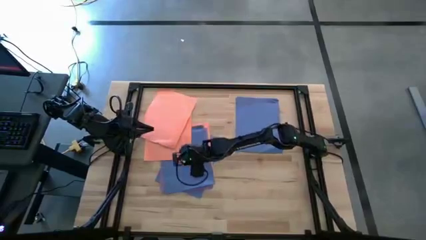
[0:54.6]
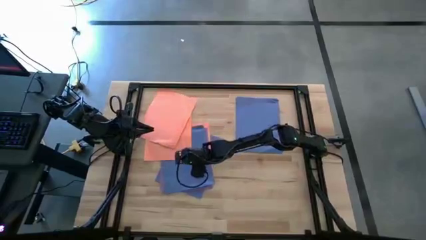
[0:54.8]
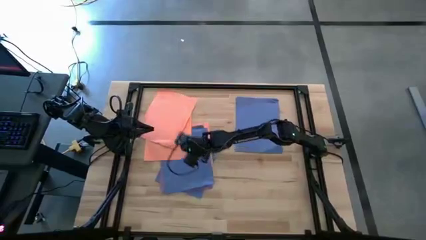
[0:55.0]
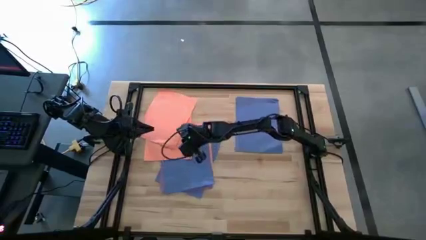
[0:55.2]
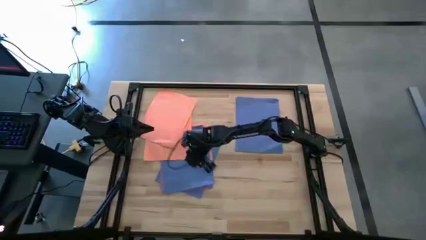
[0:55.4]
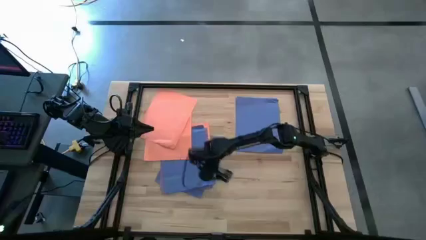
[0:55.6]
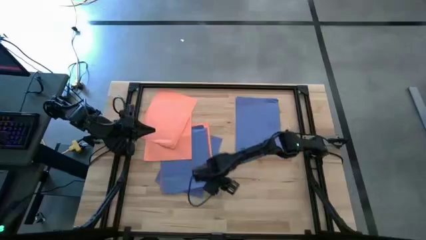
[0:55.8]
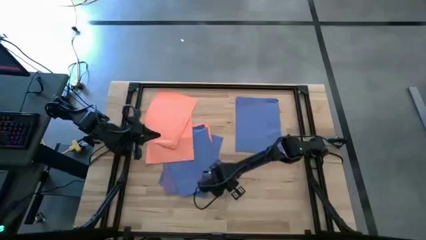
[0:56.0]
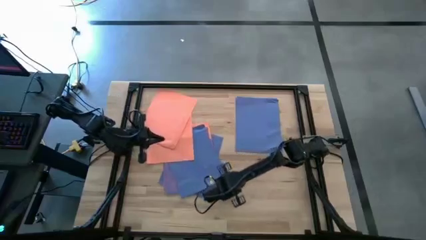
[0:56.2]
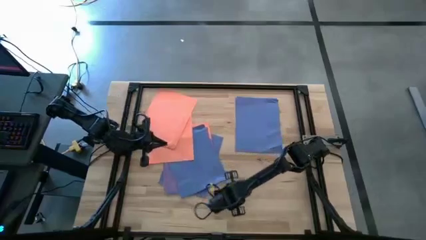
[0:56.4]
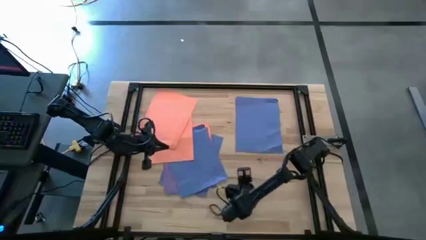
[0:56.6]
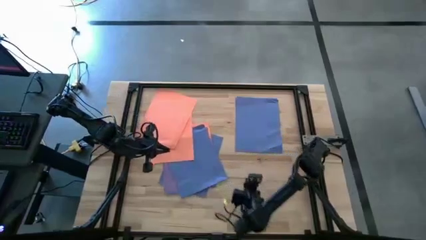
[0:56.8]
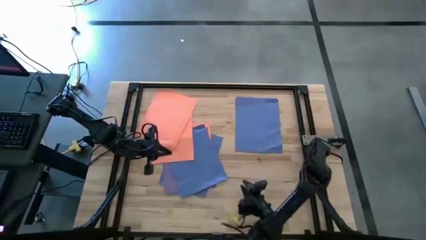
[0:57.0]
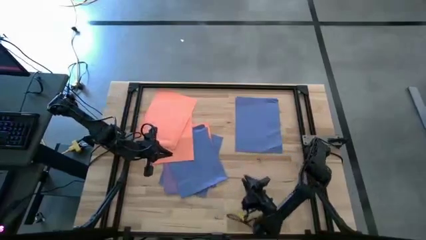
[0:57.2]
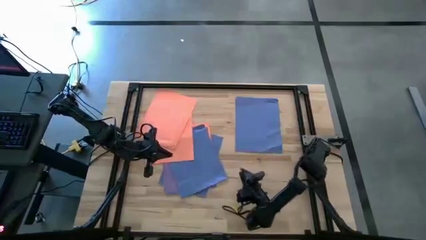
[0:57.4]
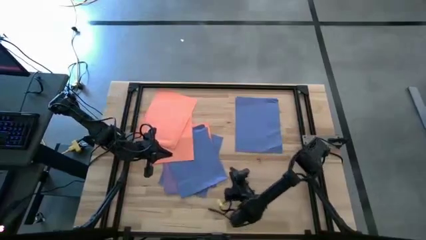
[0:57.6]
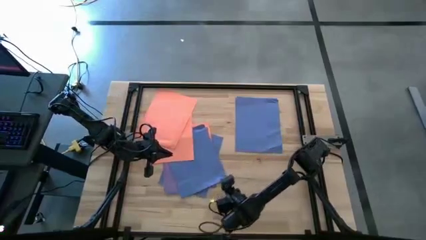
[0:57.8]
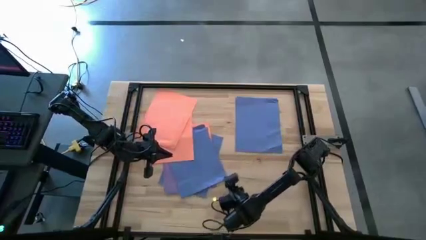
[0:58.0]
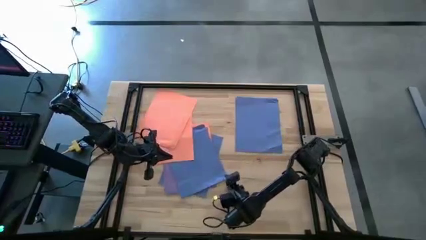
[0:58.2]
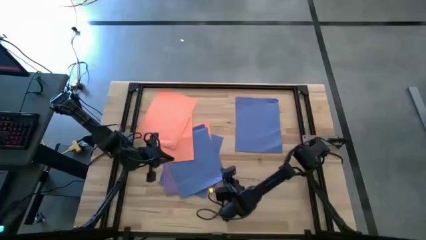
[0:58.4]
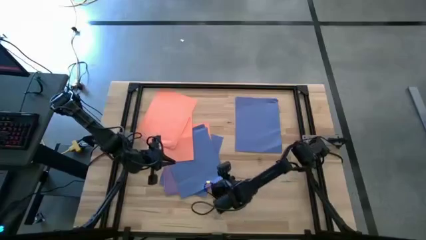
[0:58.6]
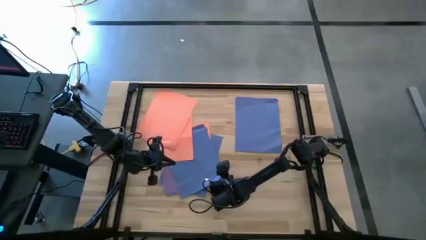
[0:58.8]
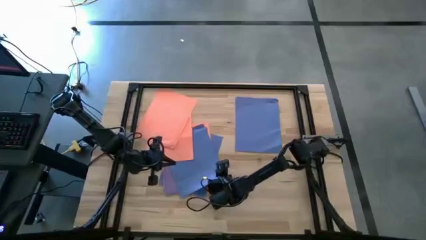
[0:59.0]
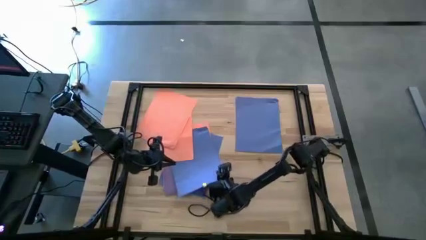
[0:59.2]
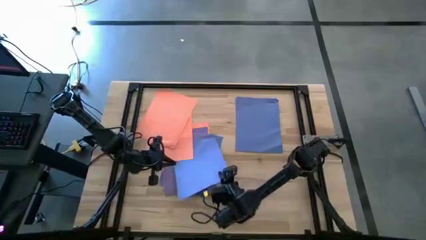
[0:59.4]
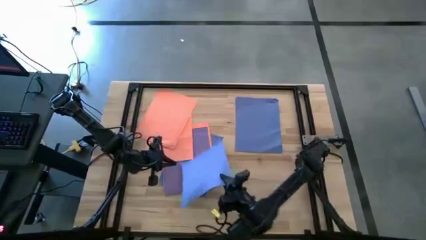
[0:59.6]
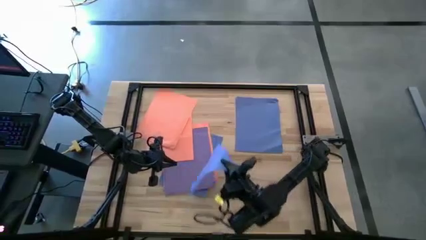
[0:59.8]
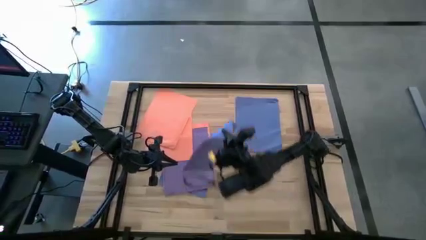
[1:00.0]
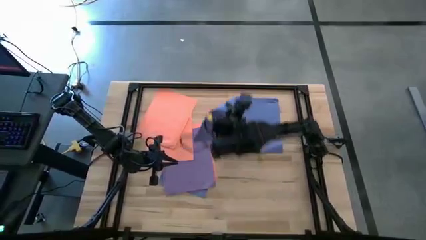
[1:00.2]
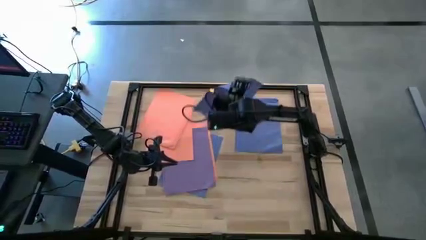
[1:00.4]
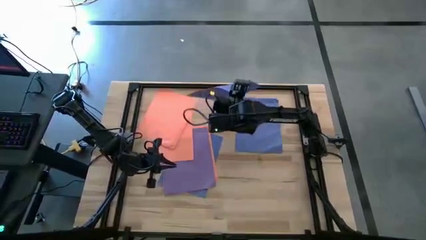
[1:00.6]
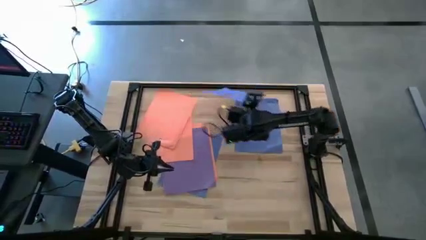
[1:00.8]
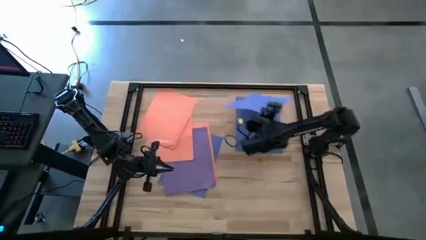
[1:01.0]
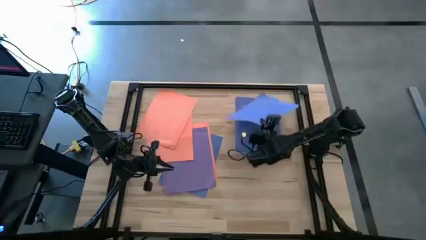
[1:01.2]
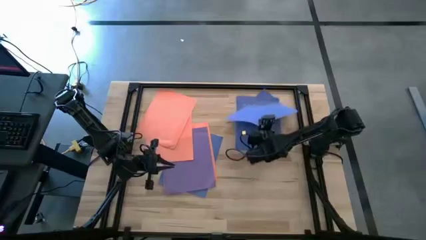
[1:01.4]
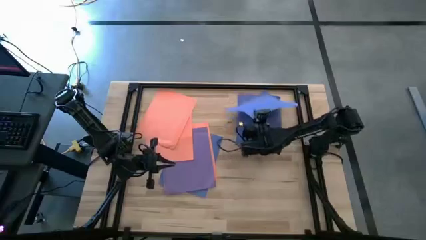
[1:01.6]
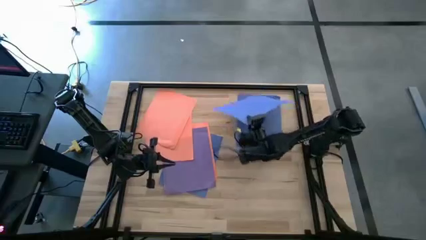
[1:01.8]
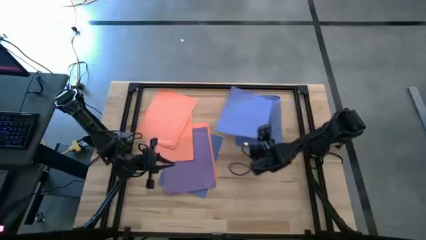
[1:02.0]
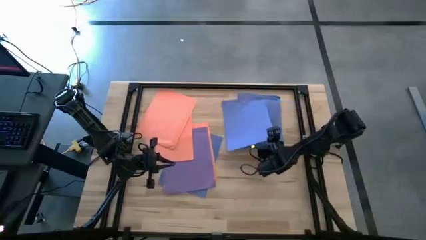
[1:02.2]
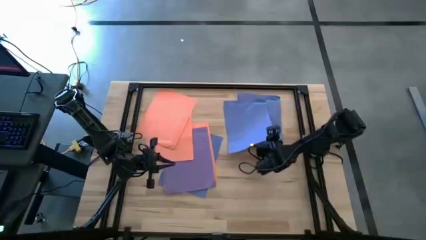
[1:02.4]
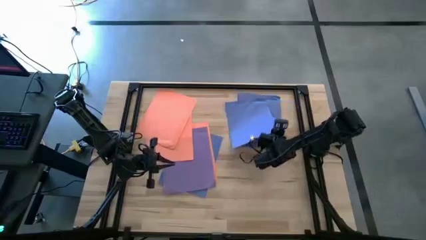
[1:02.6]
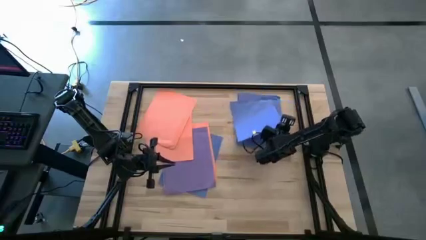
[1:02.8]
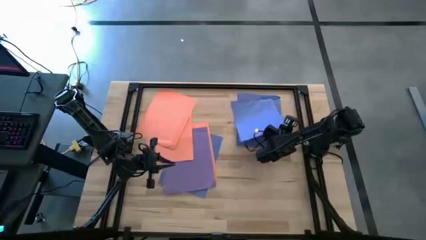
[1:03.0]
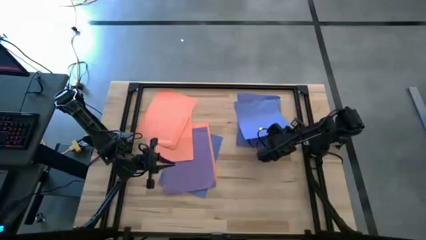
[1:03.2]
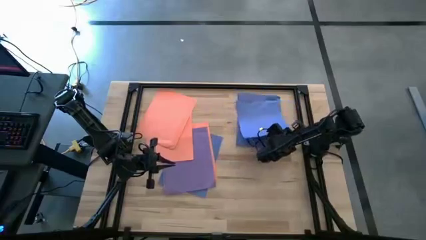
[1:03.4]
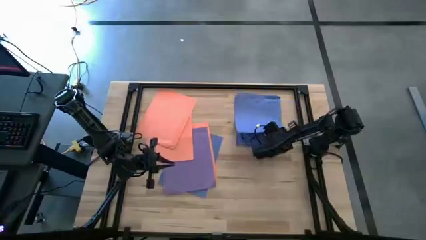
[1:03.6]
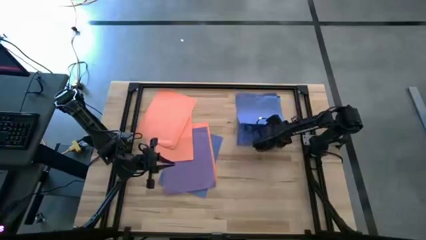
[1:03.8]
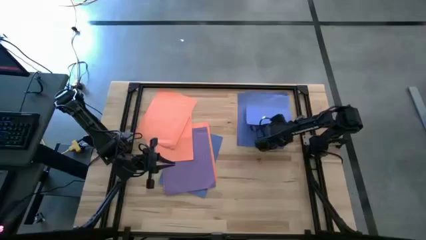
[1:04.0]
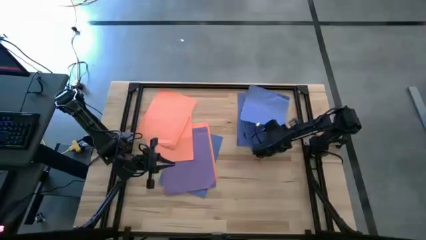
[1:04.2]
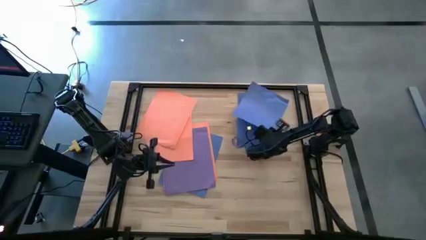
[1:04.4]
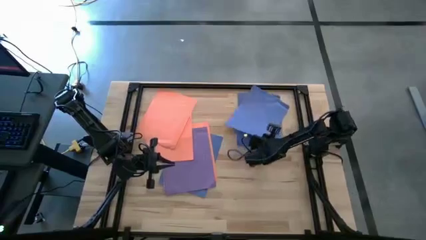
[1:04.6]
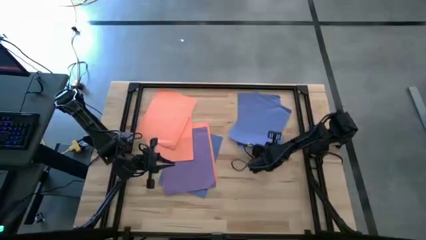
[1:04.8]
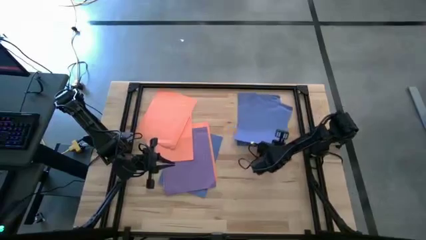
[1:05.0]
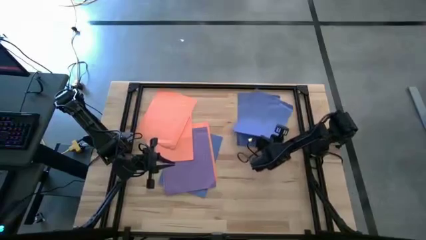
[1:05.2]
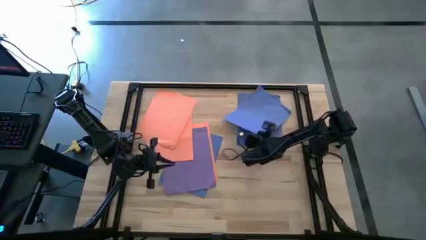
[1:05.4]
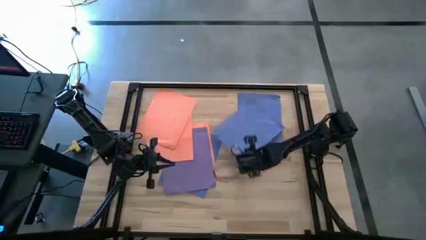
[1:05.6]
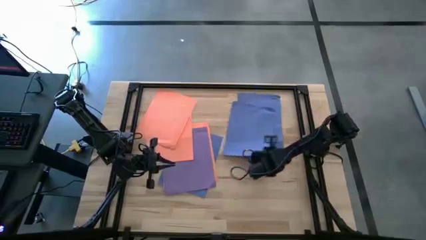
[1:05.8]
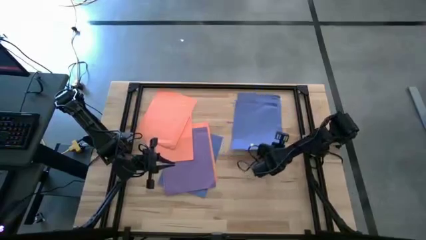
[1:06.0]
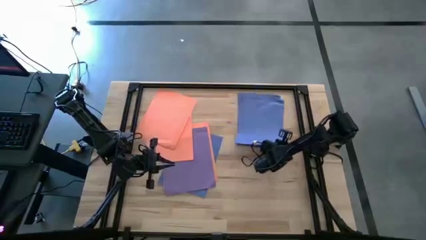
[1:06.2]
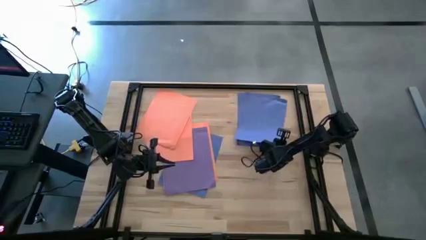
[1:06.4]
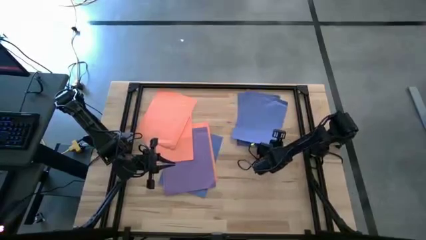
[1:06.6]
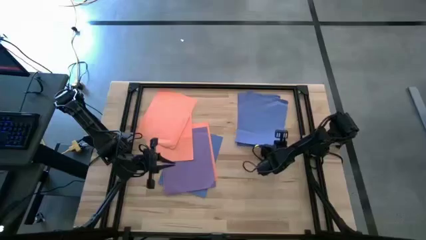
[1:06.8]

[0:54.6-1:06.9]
Task: Organize paper
Stack the blue paper on top of the blue paper

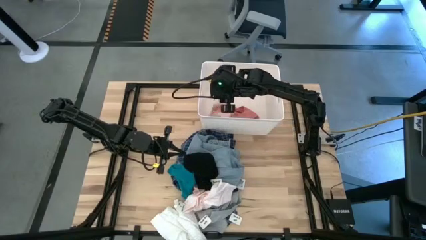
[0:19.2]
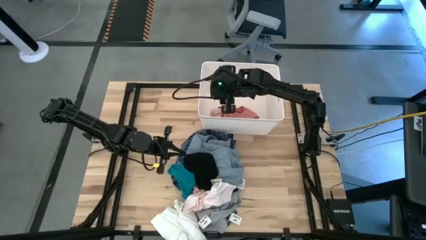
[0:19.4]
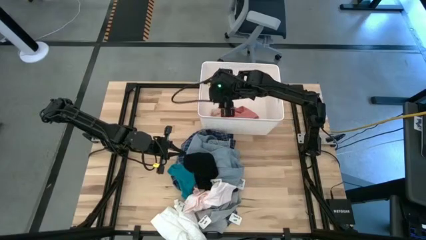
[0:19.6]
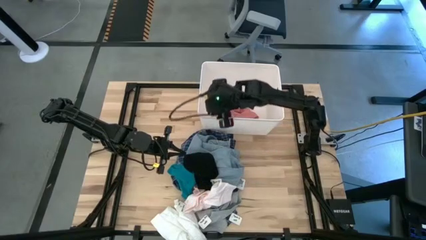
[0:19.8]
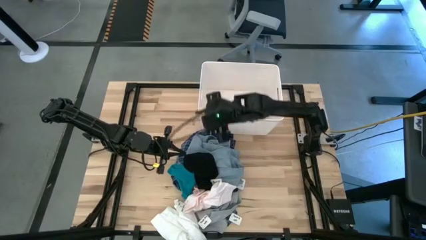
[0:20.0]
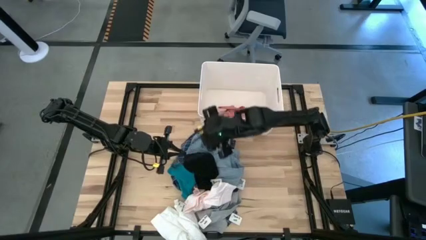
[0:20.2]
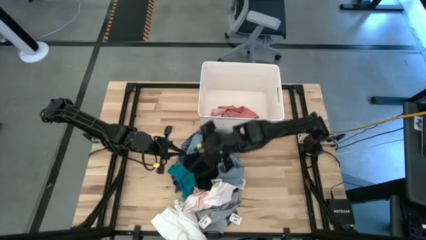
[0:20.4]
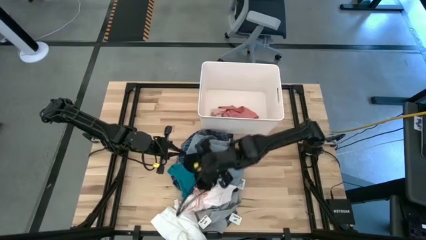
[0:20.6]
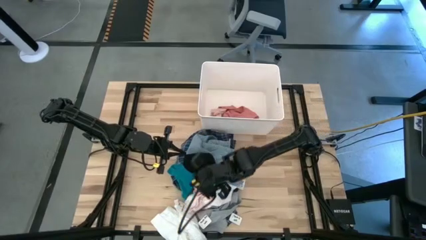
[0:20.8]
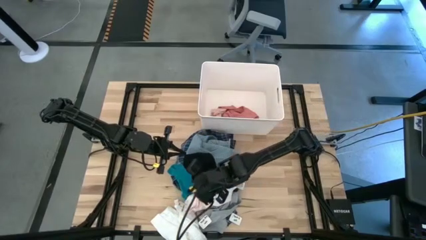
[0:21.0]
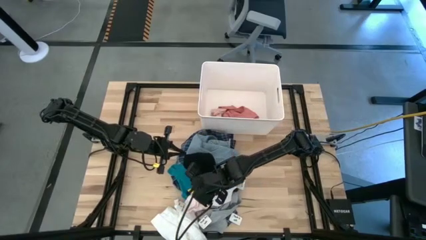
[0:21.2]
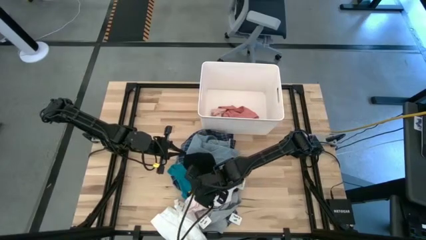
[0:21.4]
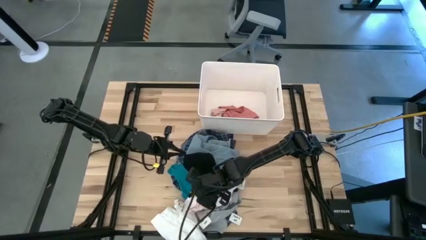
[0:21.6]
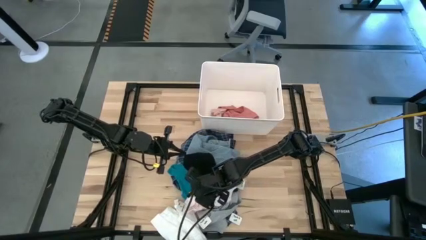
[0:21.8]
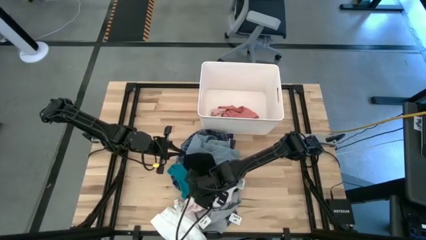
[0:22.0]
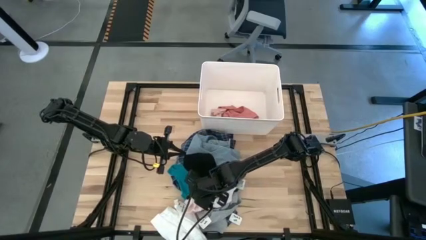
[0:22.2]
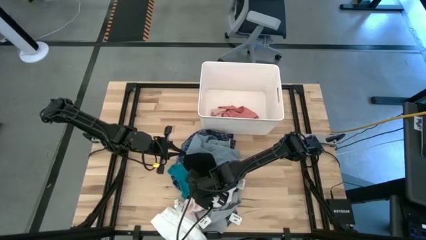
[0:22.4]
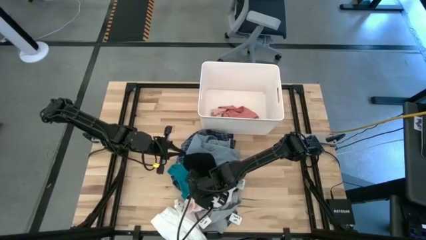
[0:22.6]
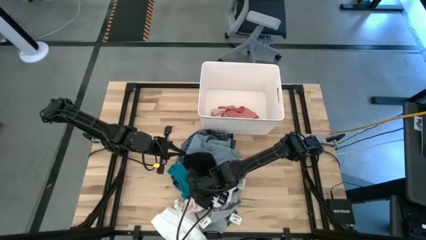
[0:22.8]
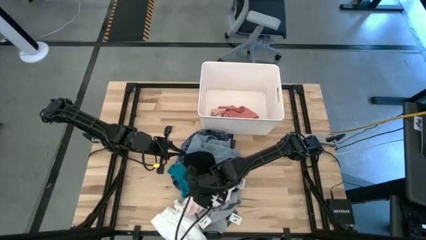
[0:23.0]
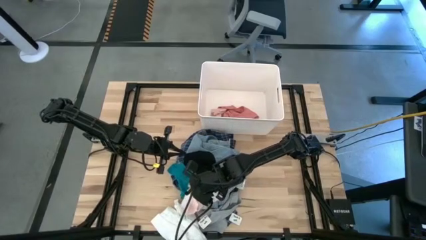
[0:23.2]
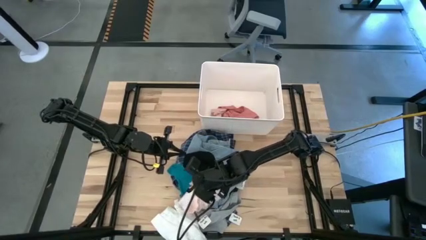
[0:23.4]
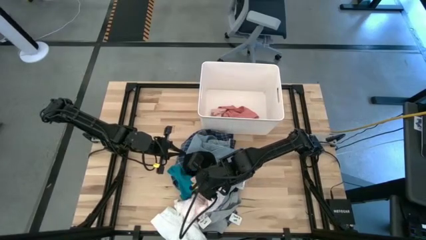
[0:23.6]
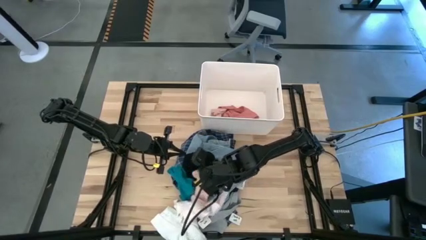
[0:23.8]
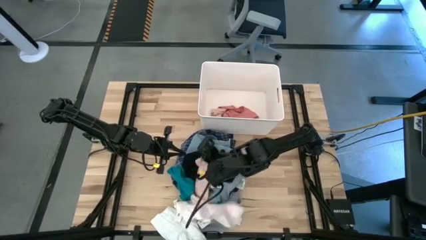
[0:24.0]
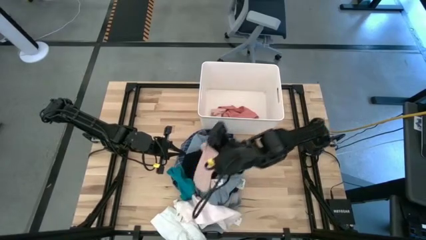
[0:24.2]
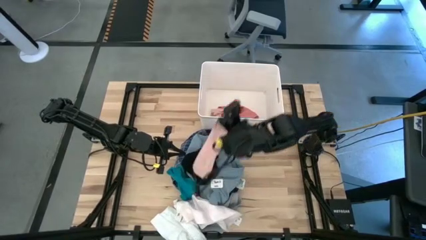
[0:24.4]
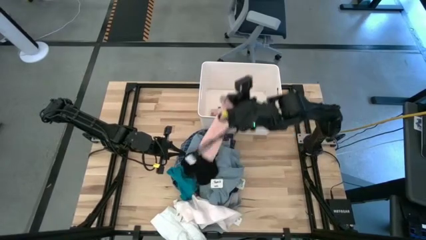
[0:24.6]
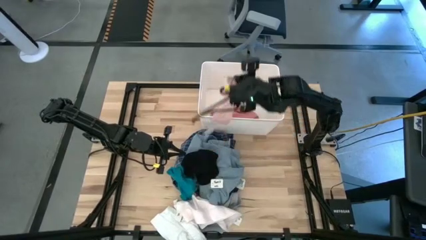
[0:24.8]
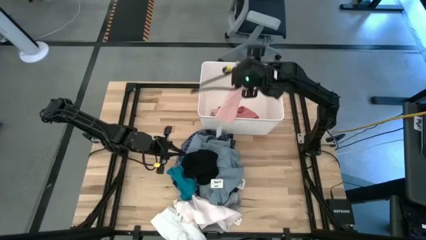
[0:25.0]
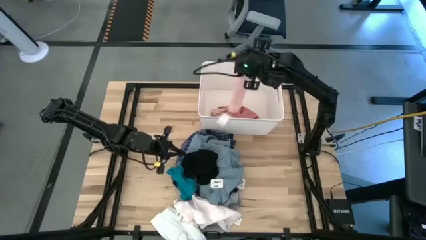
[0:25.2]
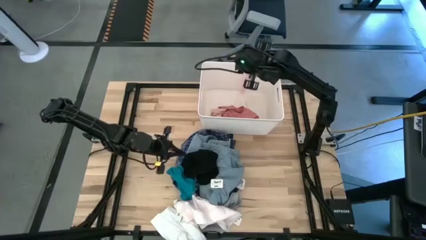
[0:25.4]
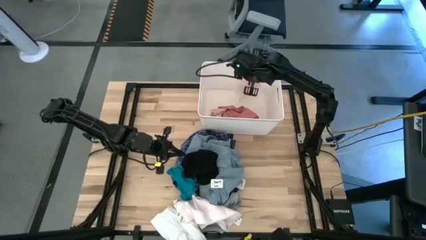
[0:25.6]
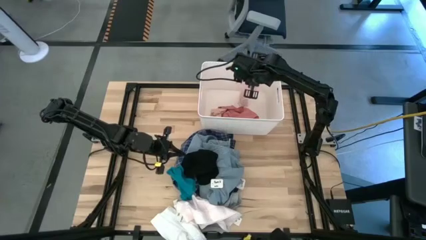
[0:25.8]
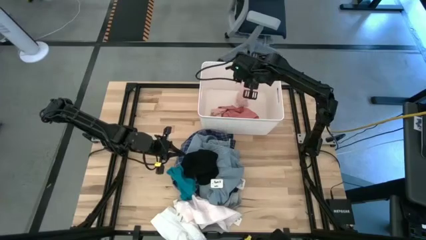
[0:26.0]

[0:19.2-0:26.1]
Task: Sort clothes
Put the orange sock into the white laundry bin
